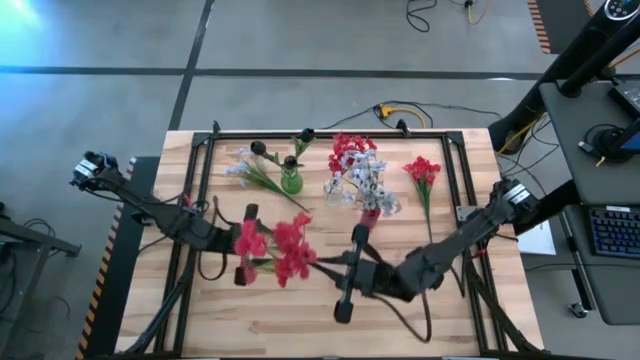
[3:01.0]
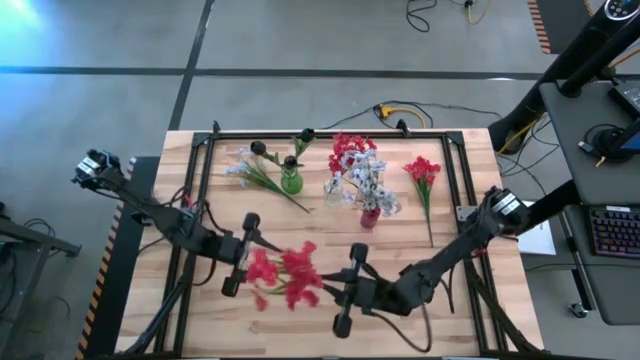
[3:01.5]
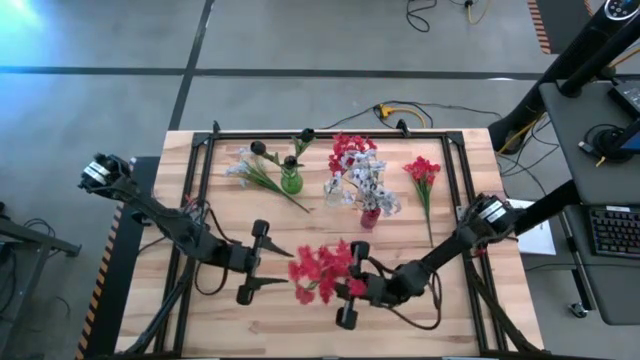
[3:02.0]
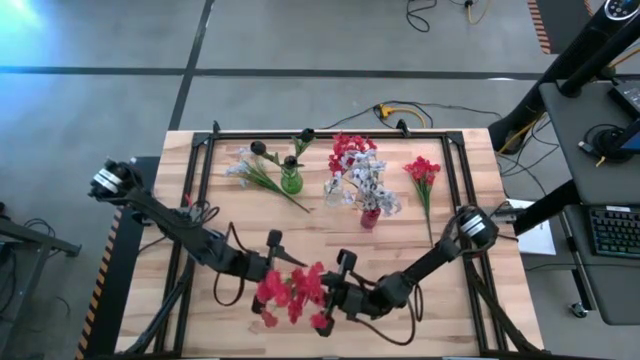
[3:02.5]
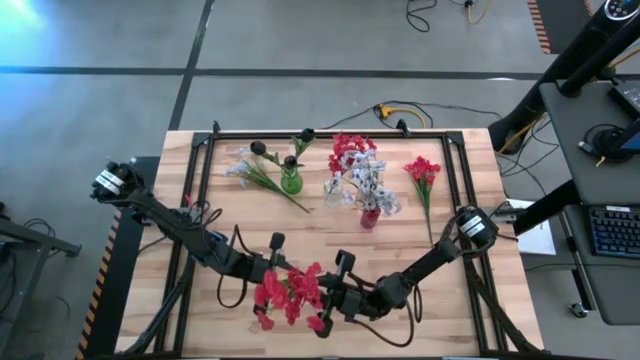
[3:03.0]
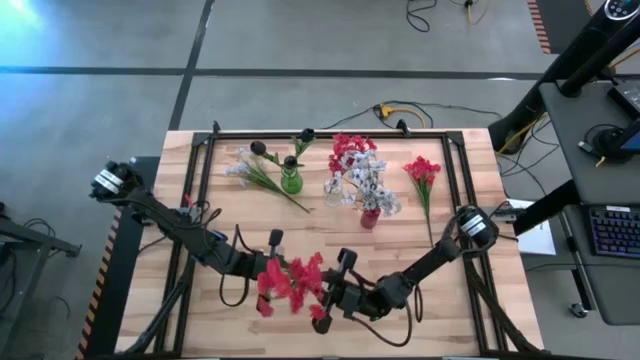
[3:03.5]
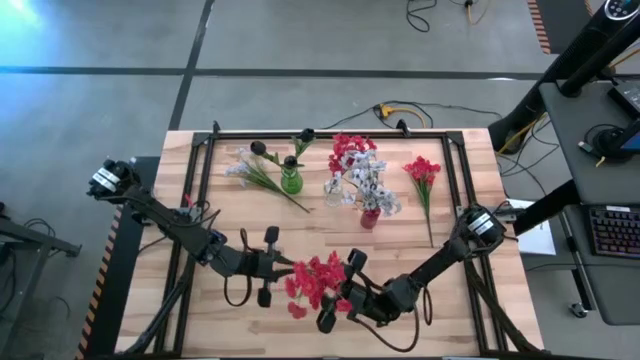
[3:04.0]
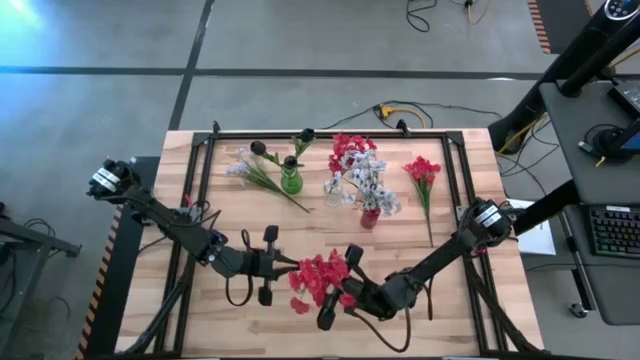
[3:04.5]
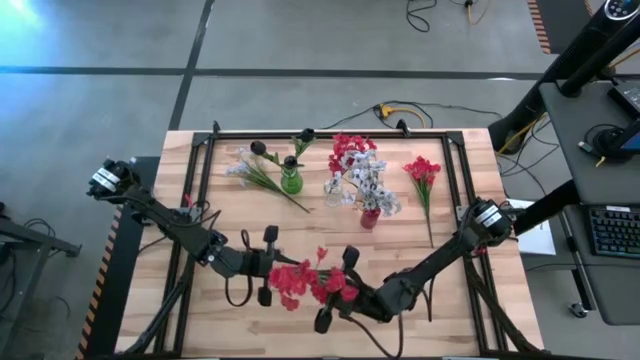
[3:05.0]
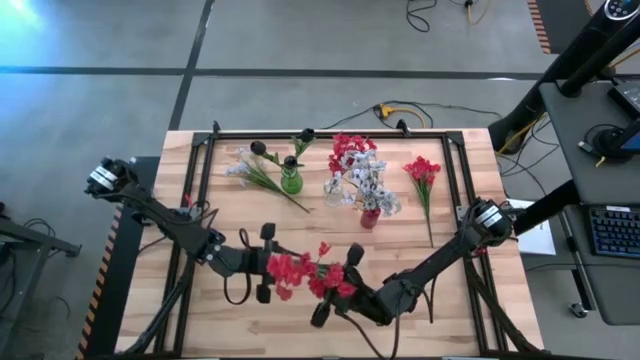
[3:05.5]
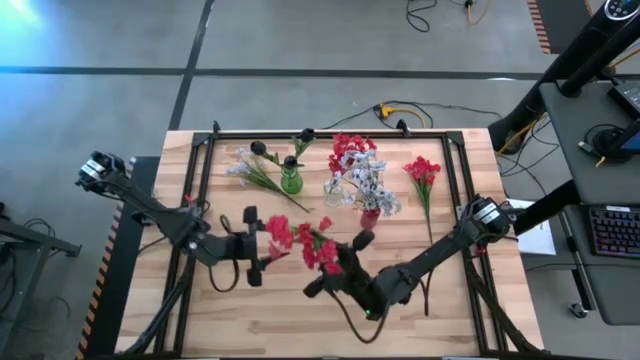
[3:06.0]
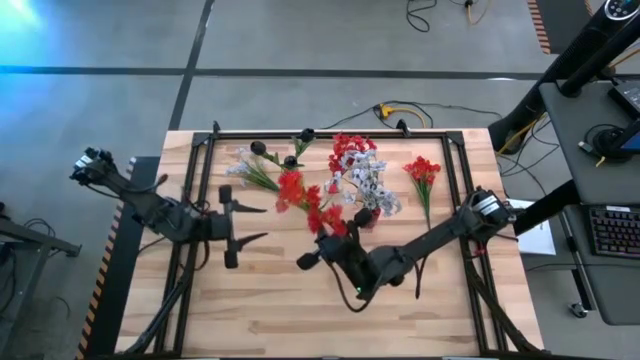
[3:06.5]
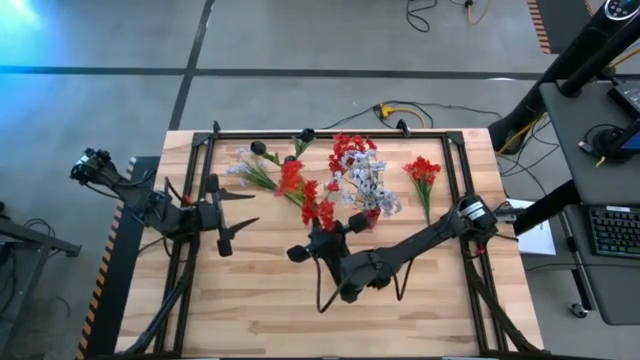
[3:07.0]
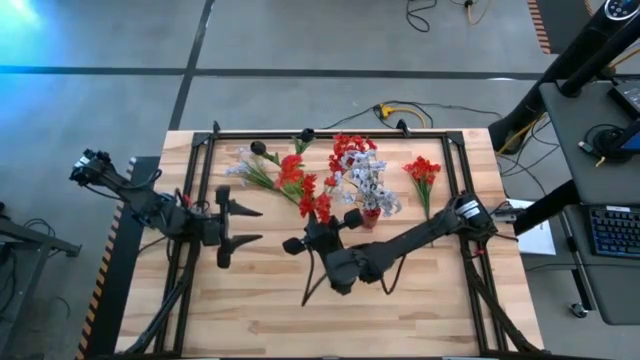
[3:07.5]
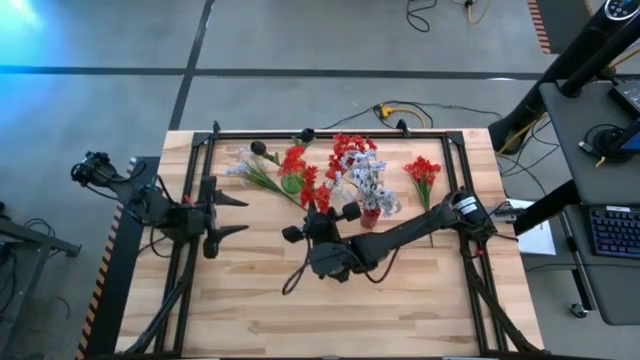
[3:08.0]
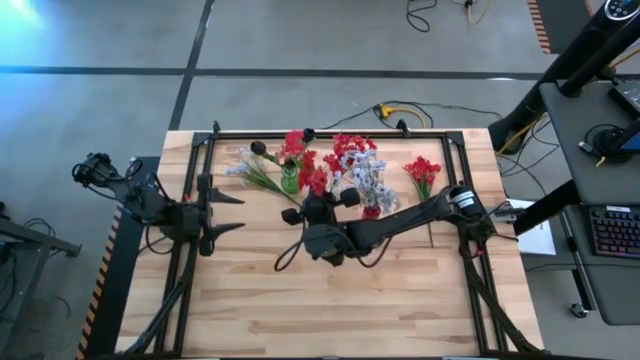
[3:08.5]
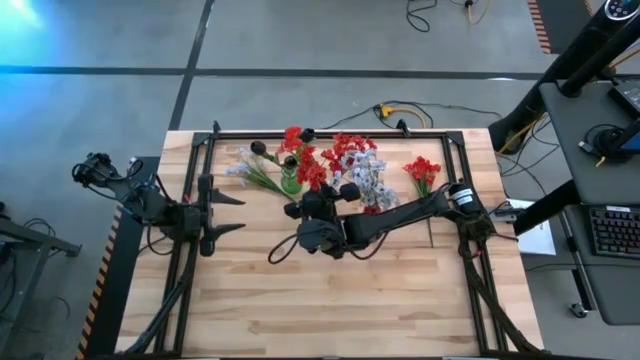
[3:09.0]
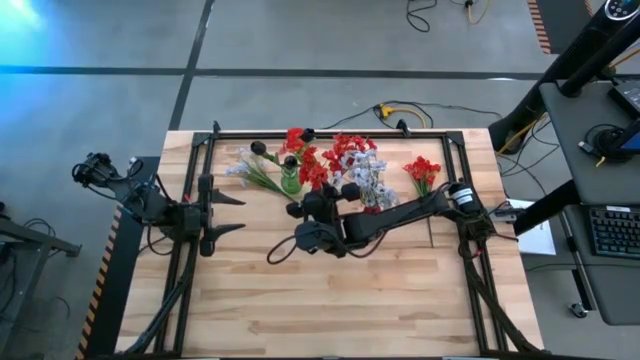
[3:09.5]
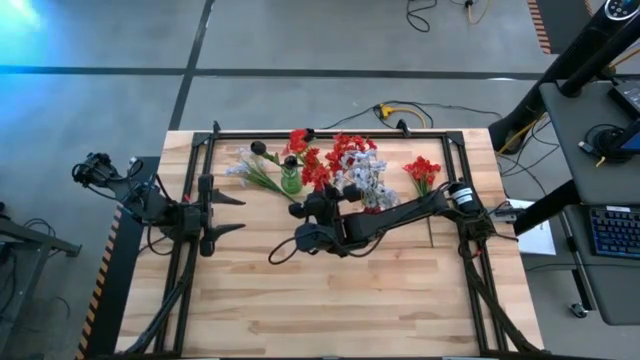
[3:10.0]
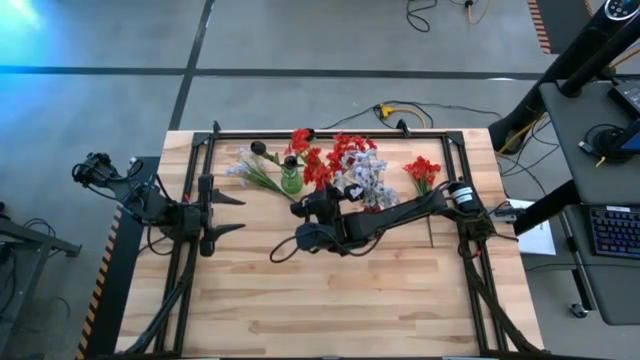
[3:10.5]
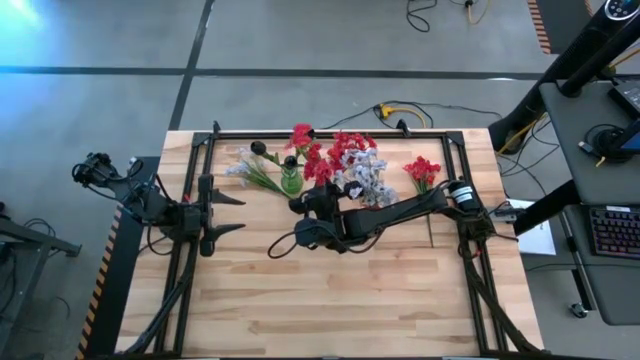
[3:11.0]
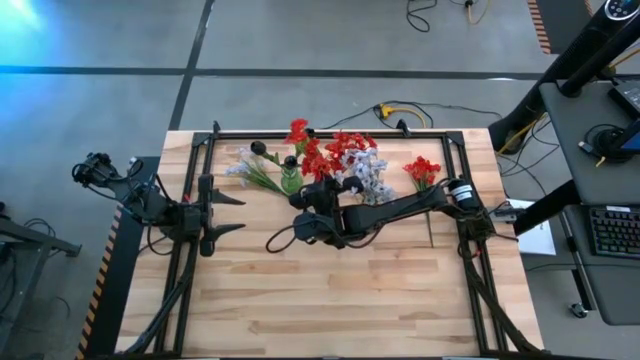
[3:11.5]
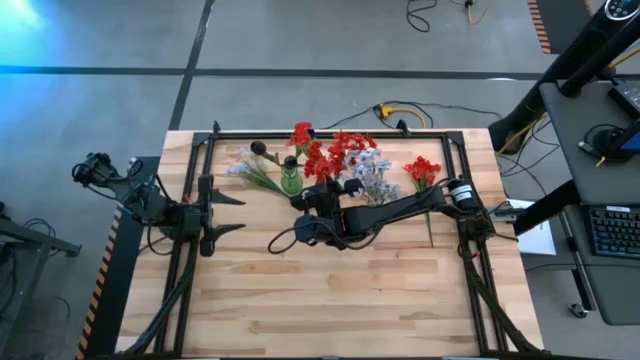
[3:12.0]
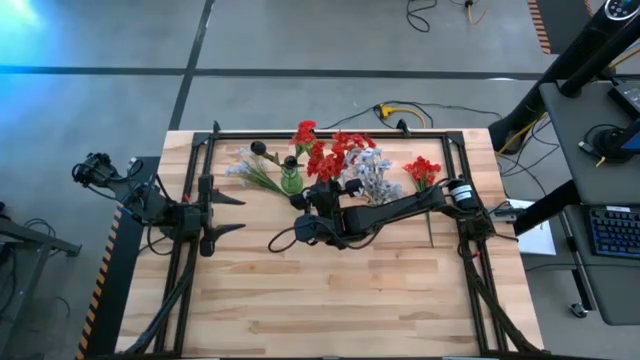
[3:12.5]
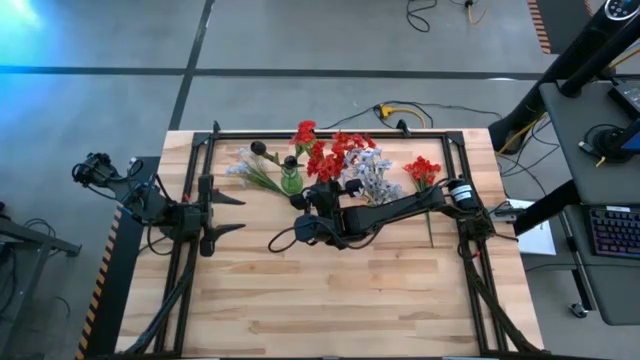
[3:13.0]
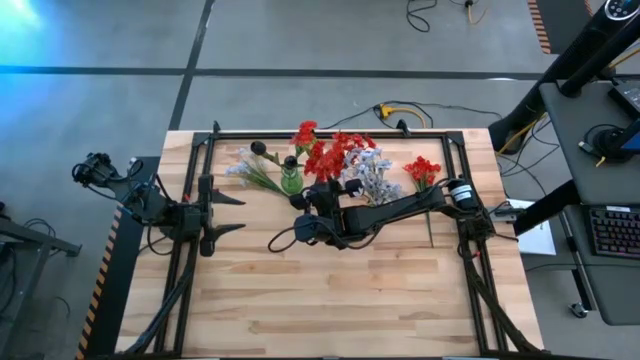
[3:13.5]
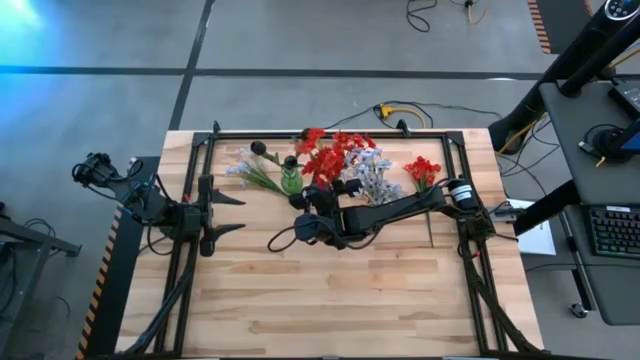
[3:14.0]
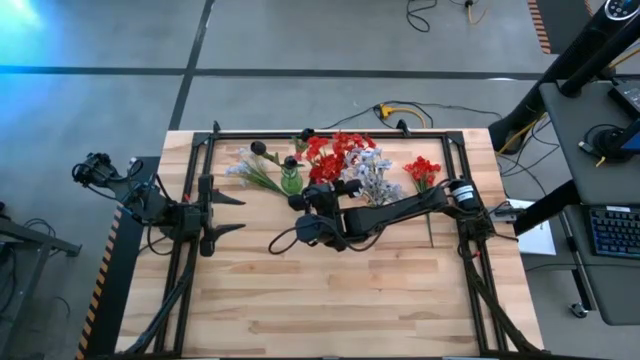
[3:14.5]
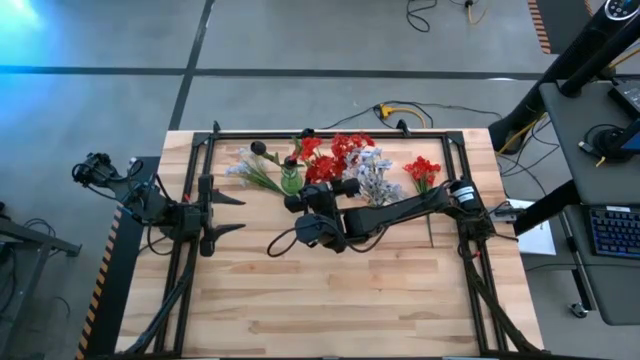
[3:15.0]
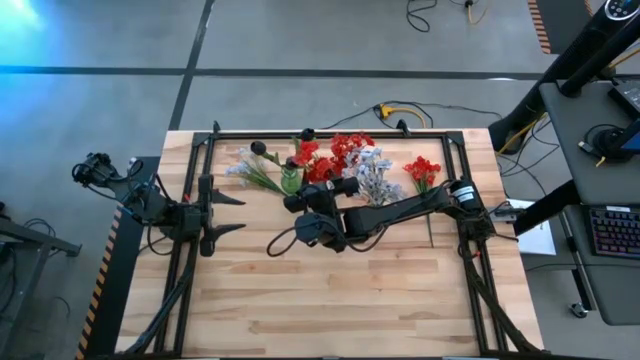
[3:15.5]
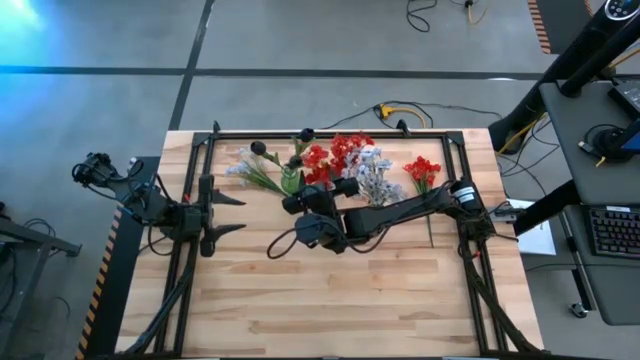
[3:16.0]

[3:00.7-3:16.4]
Task: Sort flowers into vase by color
Put the left orange flowers into the vase

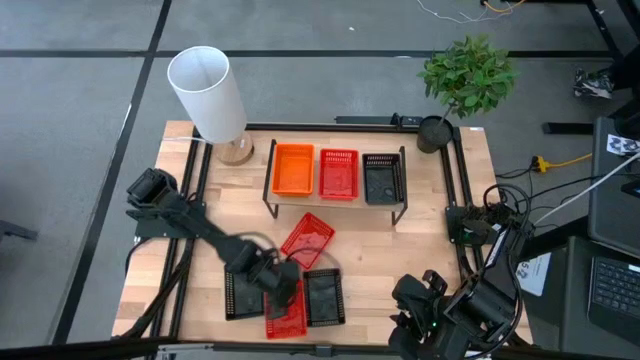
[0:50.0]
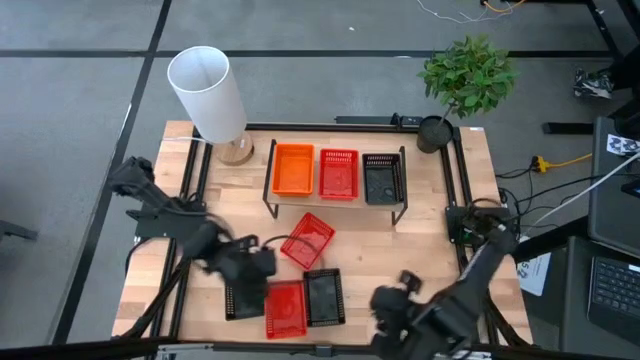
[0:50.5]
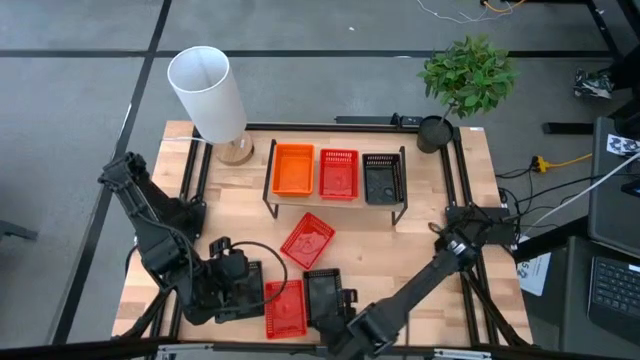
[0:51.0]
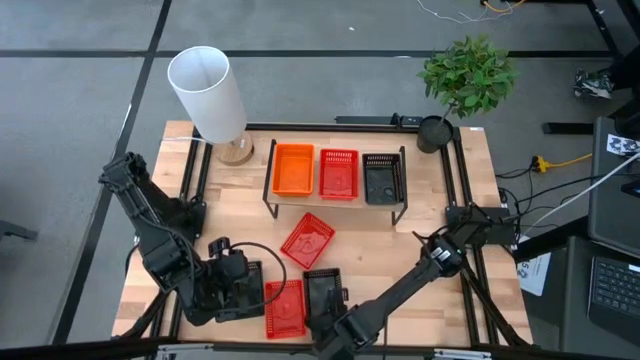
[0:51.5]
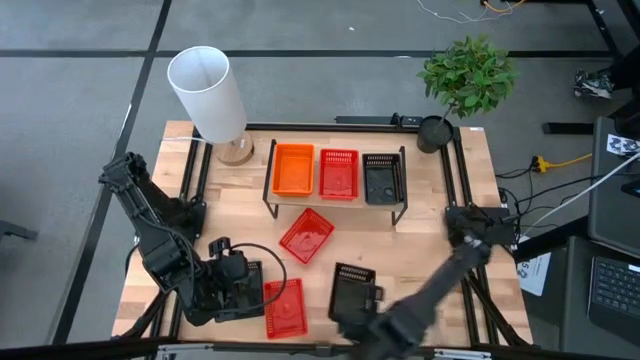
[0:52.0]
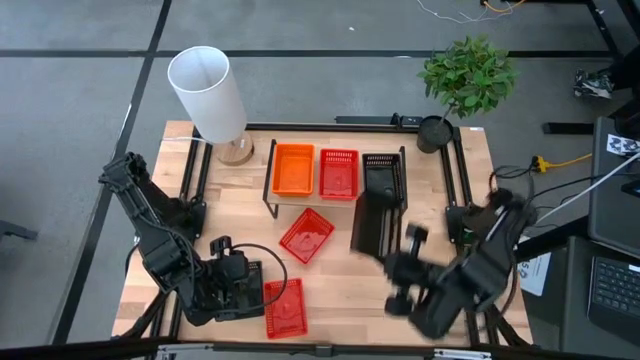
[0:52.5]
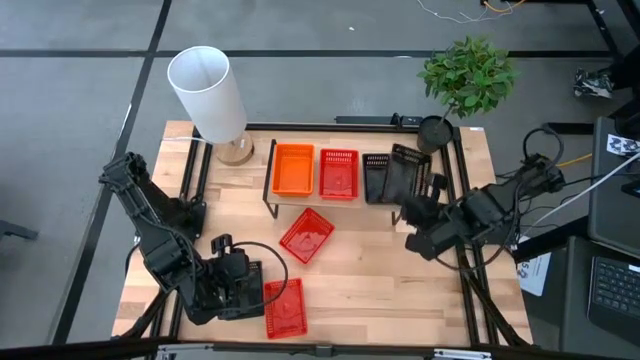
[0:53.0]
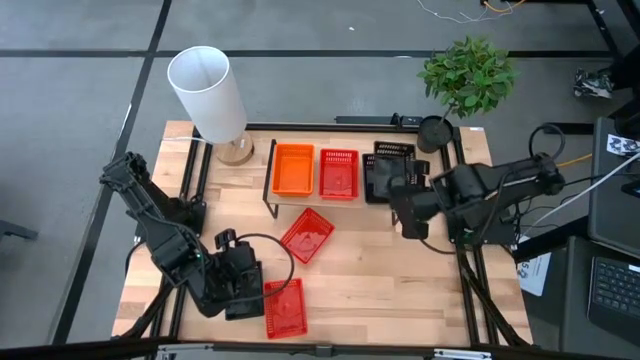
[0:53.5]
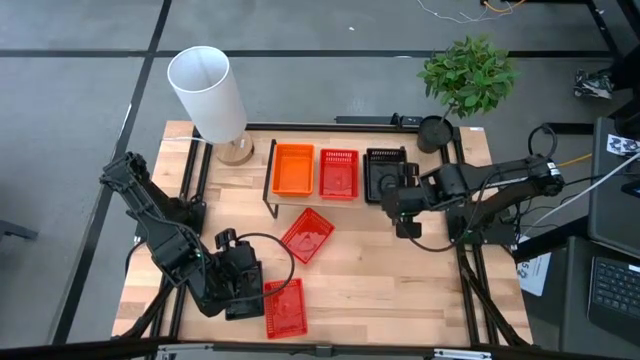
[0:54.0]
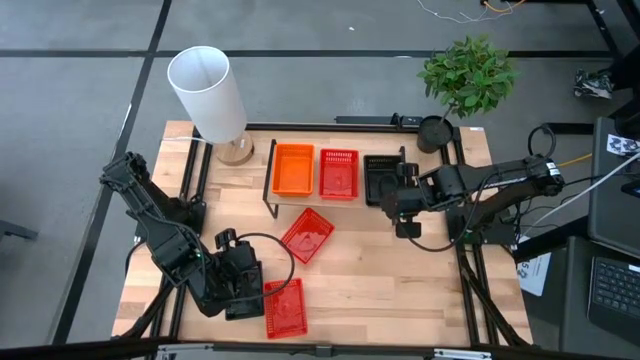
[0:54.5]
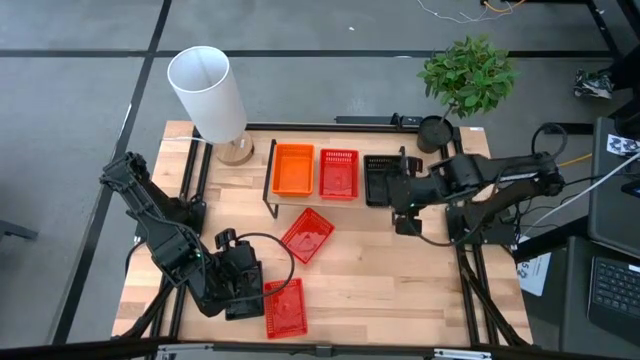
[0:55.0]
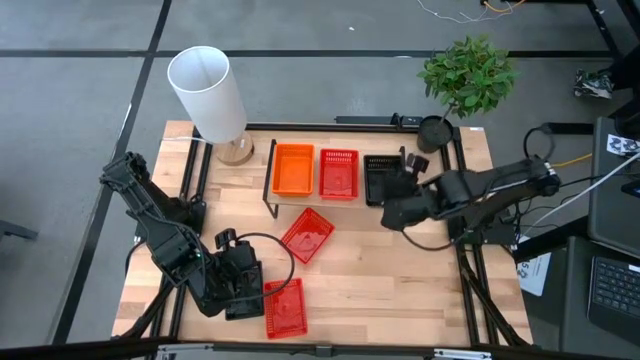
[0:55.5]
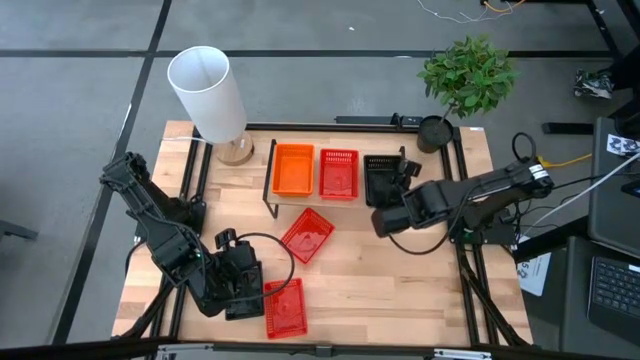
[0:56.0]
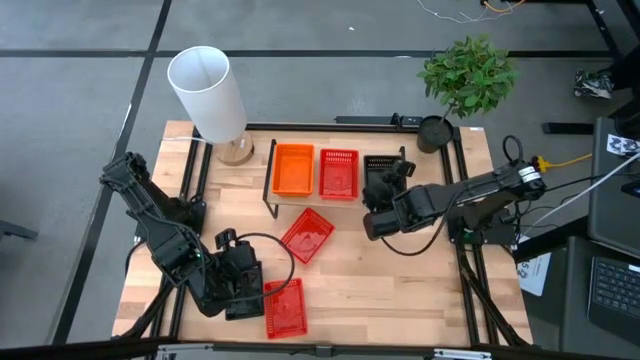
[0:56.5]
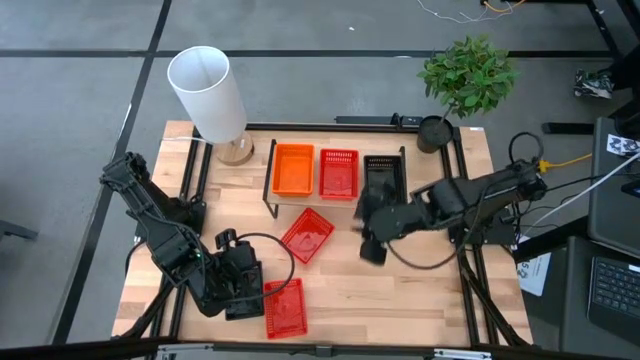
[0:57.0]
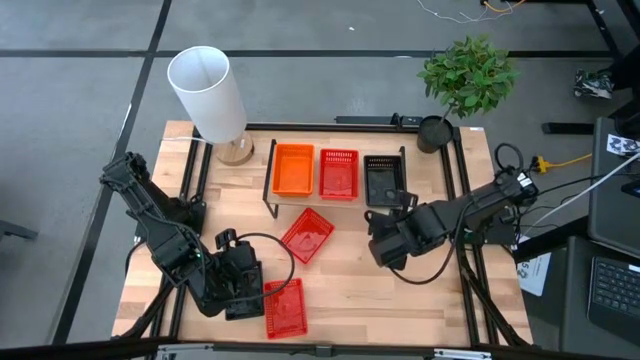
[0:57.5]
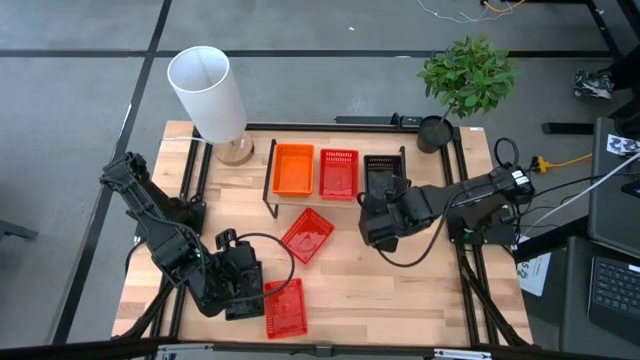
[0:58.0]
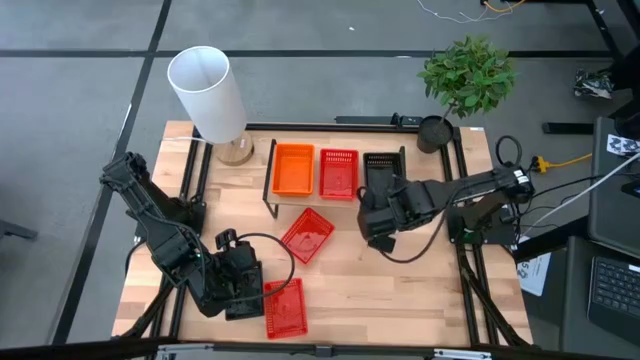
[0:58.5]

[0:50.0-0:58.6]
Task: Stack baskets on shelf by color
Stack the right black bin on top of the other black bin on the shelf
